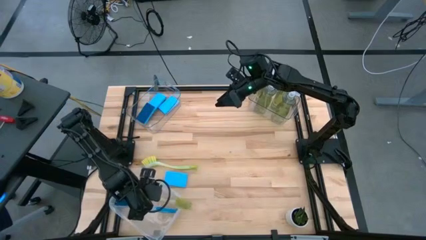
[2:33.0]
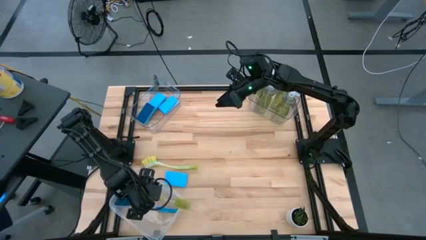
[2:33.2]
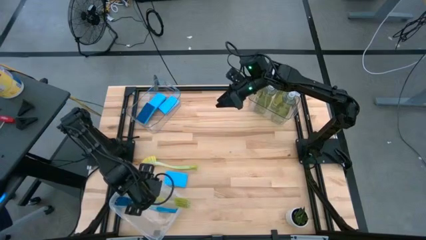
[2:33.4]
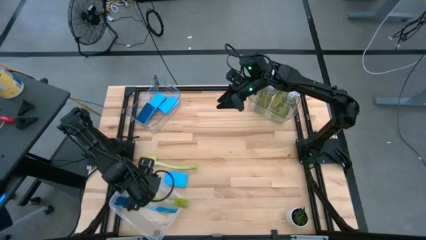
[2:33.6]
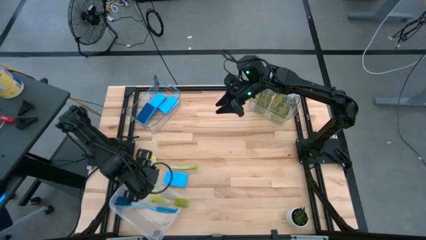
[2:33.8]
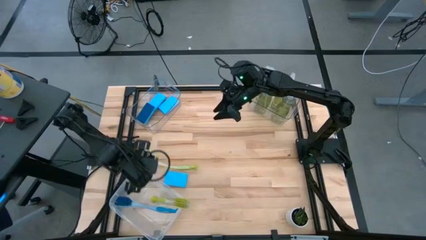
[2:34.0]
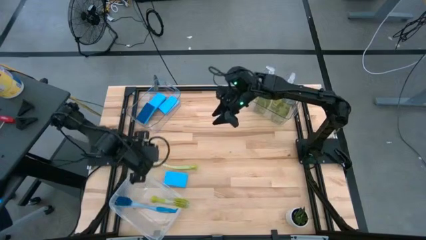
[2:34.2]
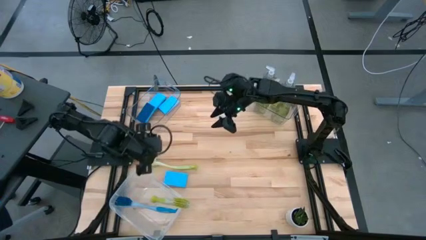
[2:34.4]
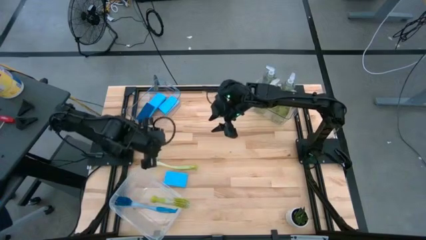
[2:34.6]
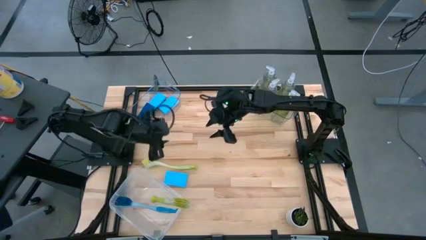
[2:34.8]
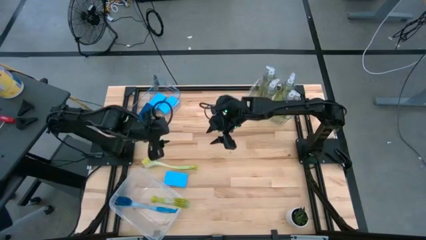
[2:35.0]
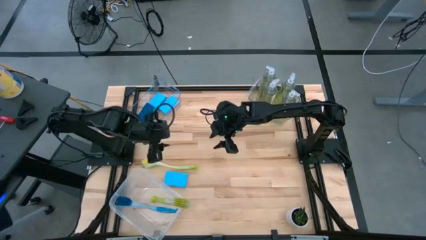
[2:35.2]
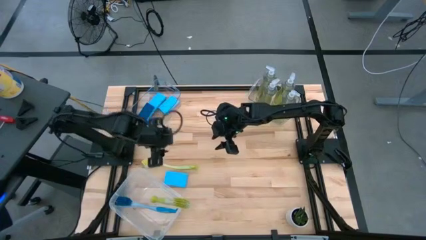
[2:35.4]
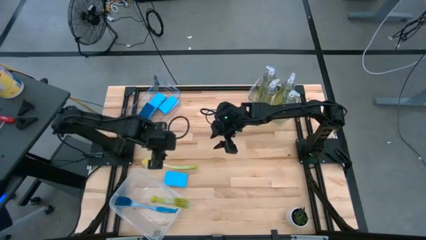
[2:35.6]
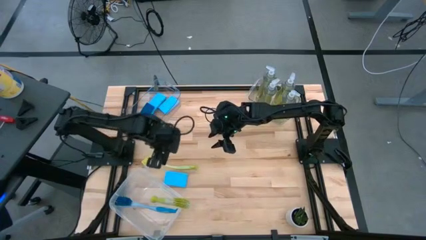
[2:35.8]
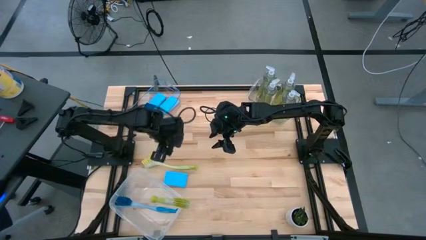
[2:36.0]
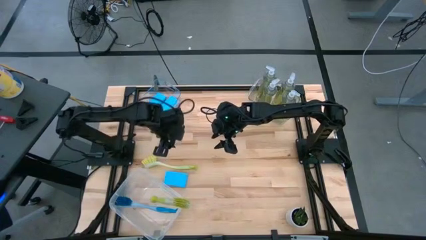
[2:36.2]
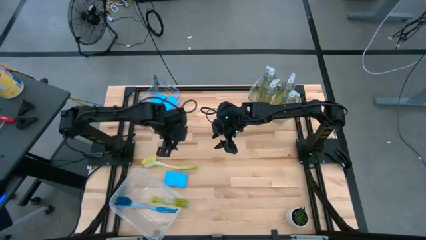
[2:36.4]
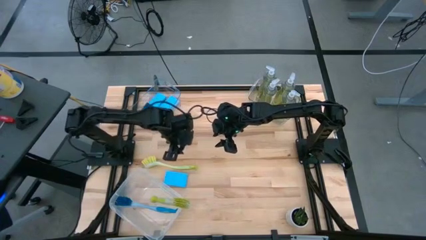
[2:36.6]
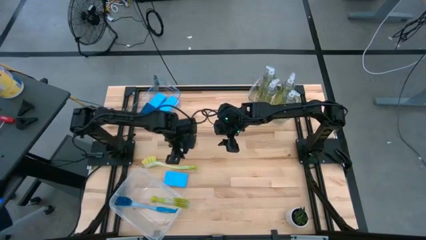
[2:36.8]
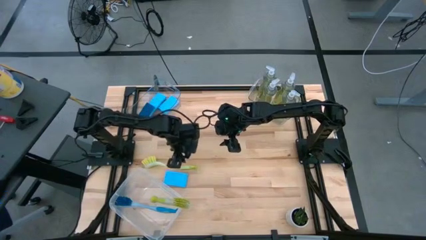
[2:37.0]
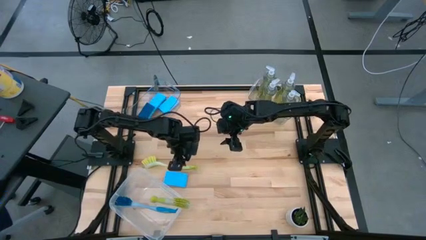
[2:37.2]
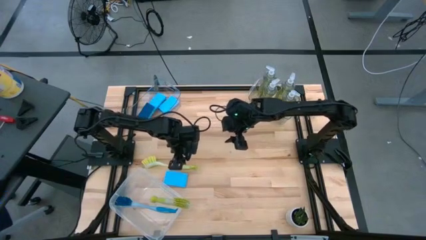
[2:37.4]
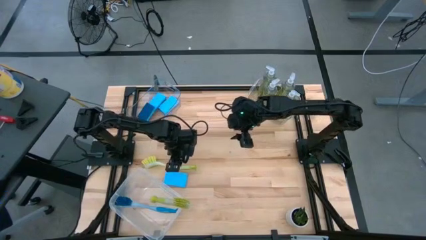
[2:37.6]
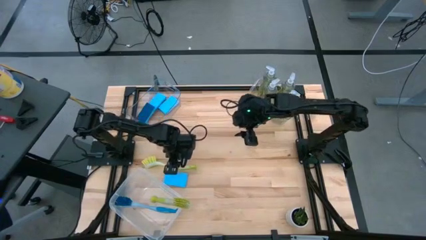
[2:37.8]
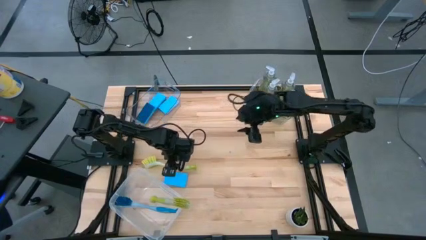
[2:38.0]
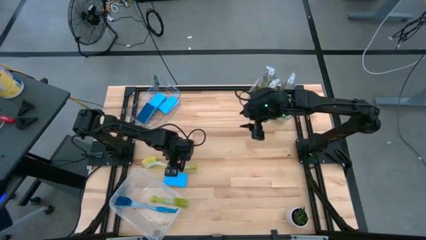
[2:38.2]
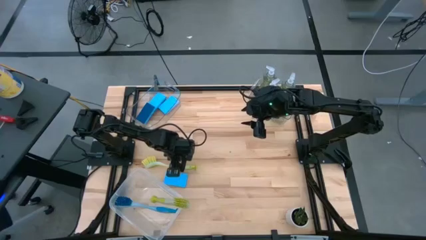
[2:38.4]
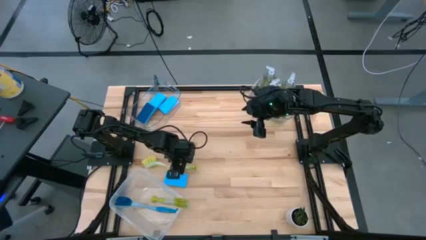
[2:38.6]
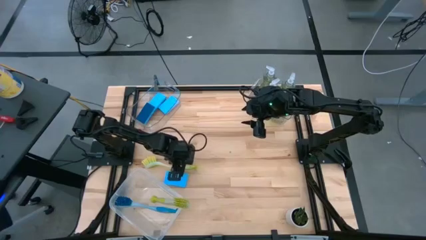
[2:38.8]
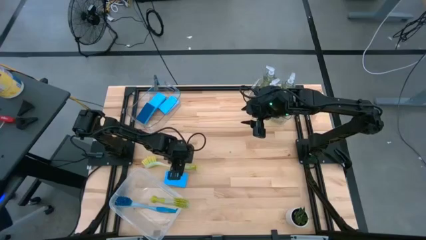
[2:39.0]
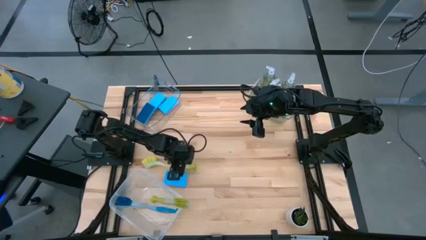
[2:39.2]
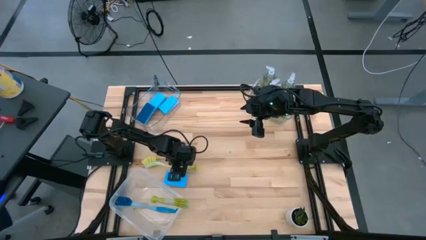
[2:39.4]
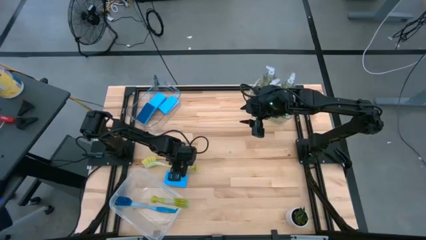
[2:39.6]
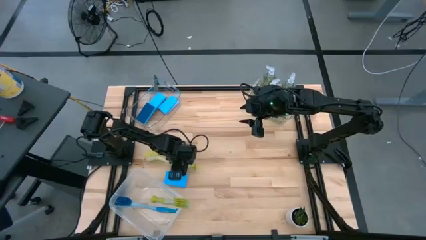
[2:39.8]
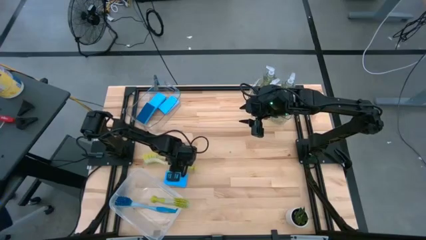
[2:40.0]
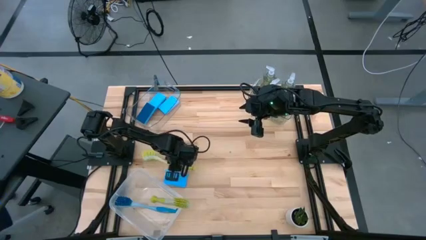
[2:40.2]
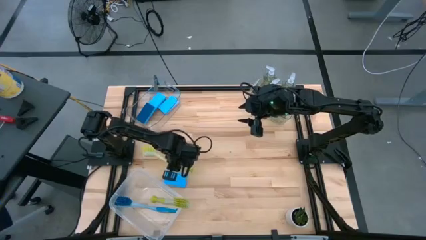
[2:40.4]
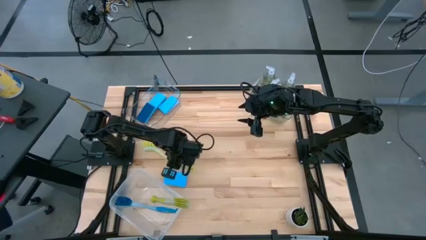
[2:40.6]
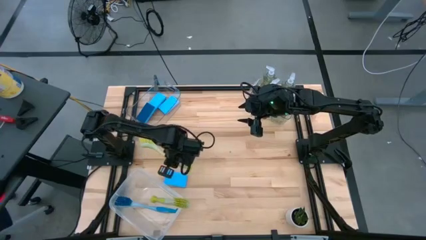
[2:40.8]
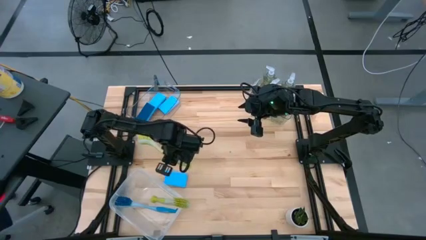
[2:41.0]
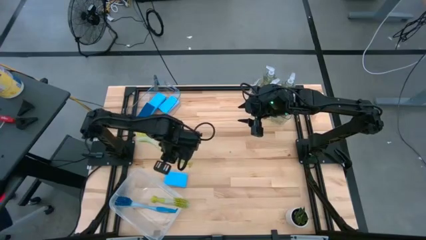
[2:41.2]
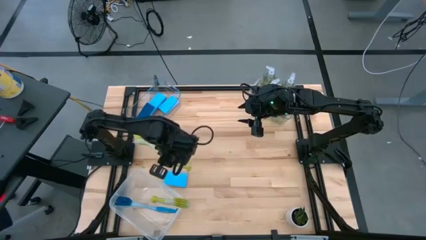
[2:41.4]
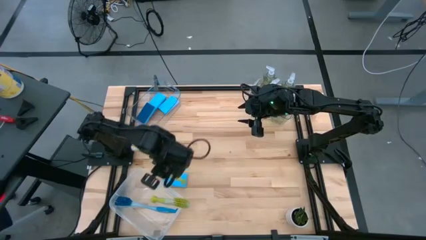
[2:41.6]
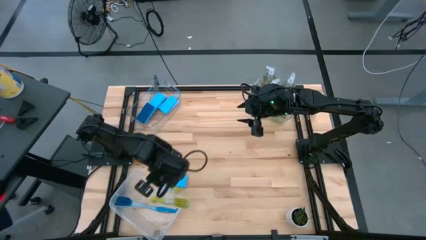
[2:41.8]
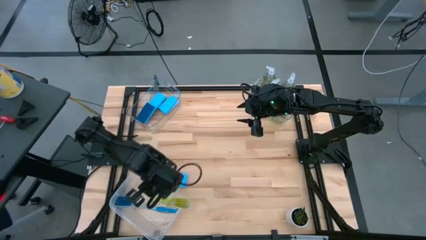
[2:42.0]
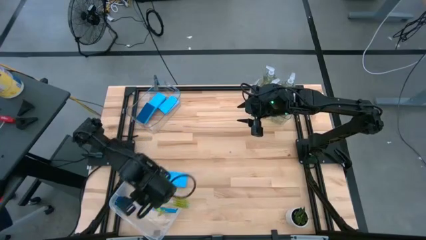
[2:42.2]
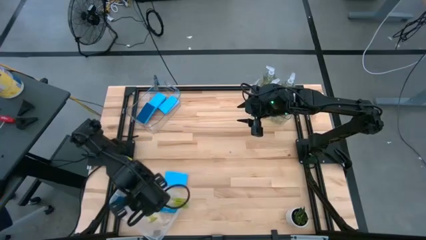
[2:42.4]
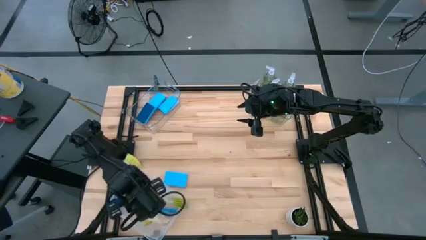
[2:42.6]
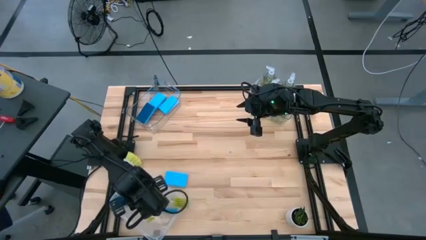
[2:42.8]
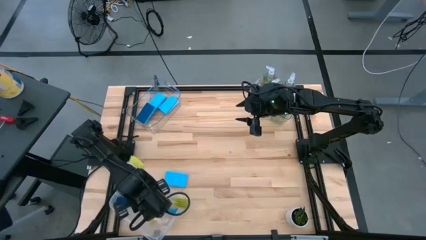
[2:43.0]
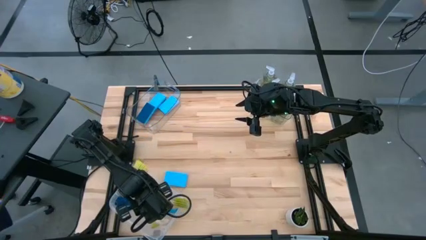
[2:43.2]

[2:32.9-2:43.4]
Task: Pick & Place Kitchen Sink Supplies
Put the yellow dish brush into the white bin

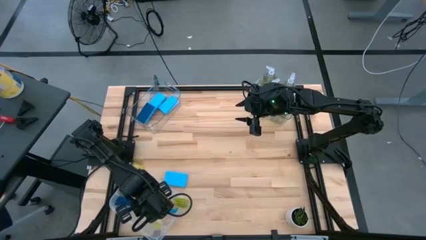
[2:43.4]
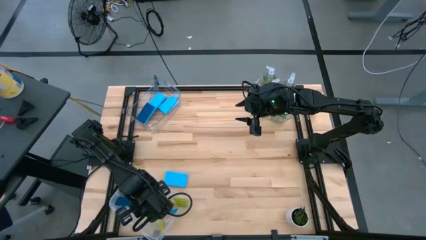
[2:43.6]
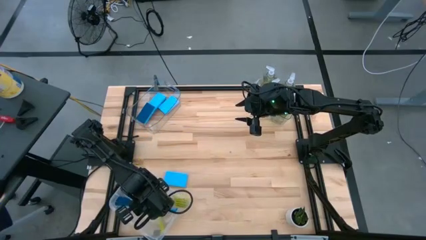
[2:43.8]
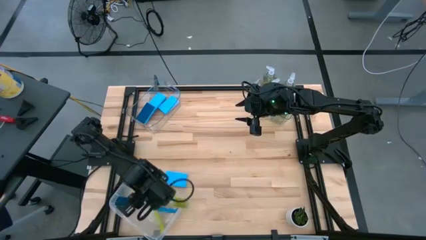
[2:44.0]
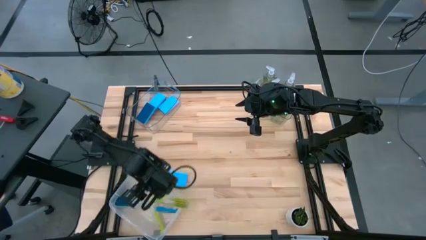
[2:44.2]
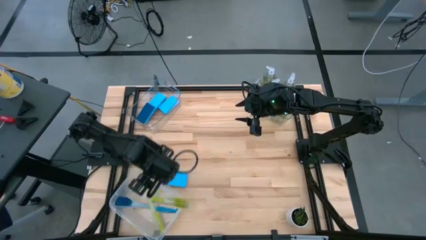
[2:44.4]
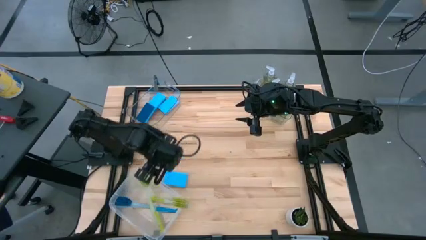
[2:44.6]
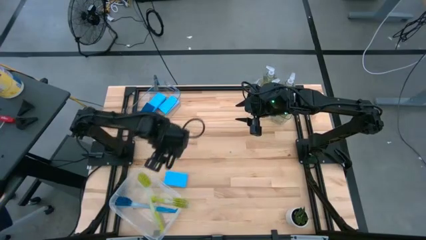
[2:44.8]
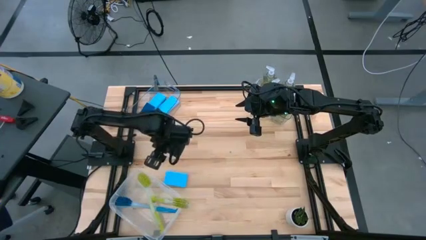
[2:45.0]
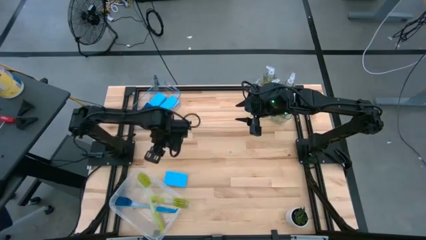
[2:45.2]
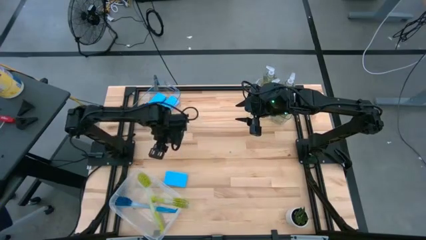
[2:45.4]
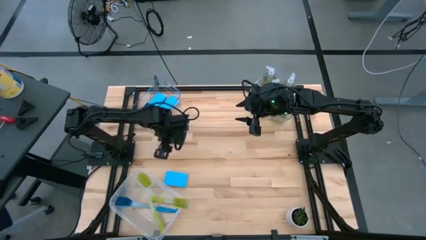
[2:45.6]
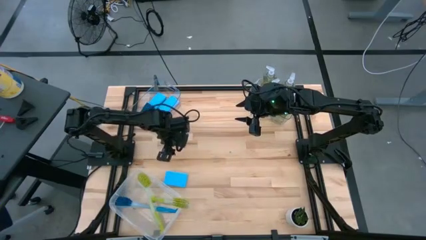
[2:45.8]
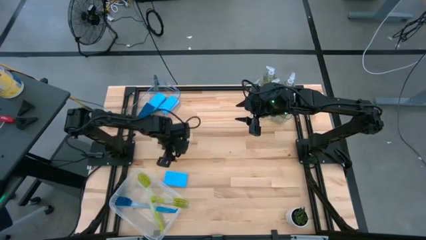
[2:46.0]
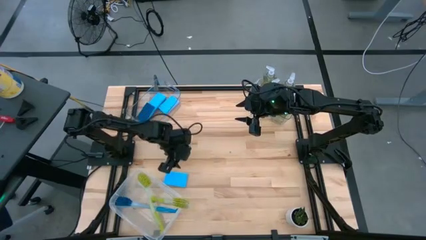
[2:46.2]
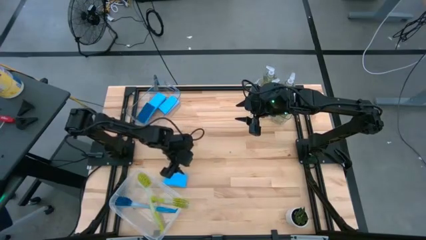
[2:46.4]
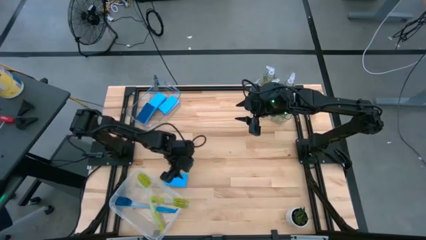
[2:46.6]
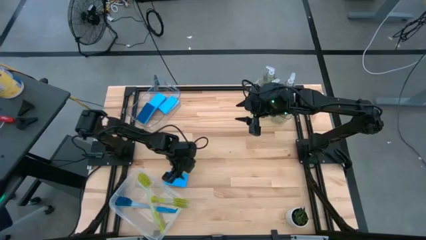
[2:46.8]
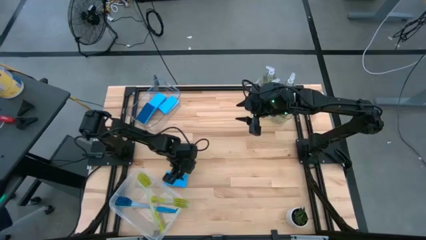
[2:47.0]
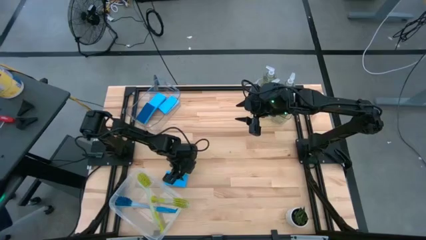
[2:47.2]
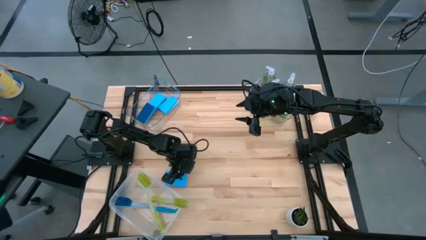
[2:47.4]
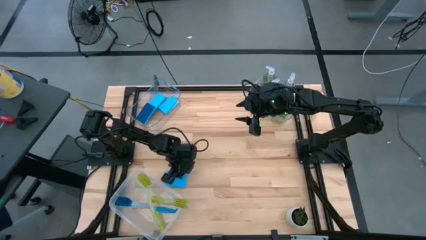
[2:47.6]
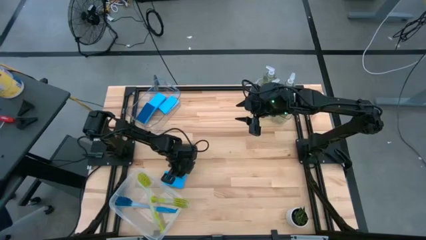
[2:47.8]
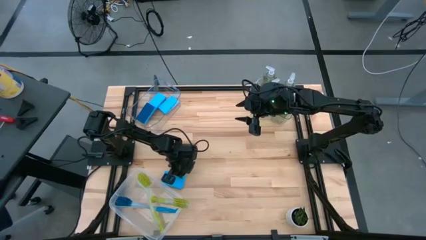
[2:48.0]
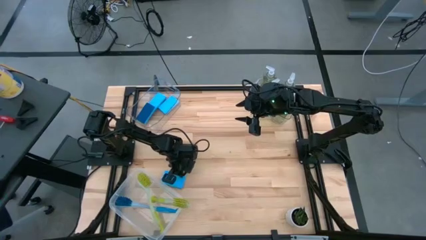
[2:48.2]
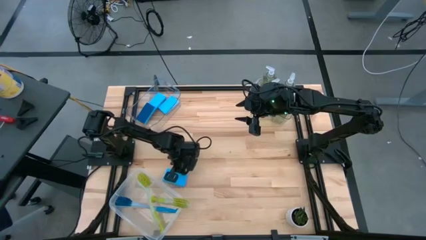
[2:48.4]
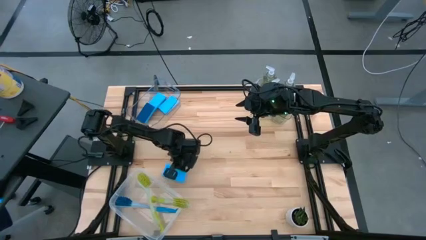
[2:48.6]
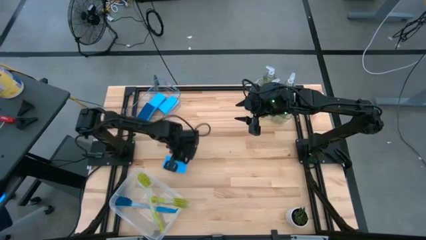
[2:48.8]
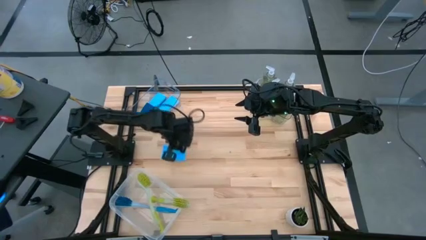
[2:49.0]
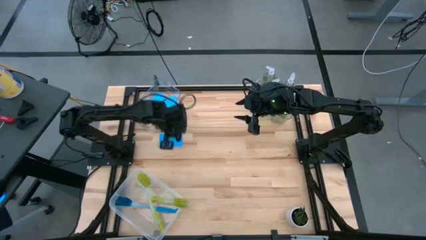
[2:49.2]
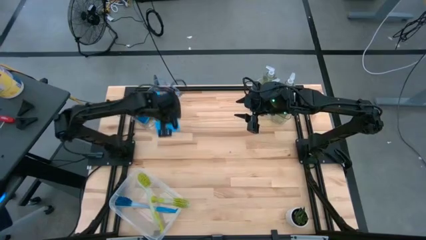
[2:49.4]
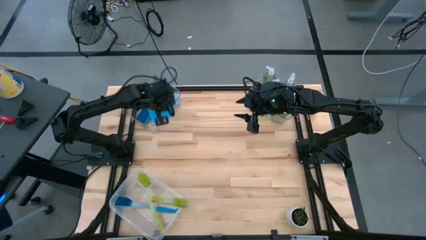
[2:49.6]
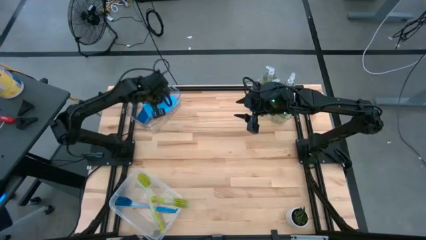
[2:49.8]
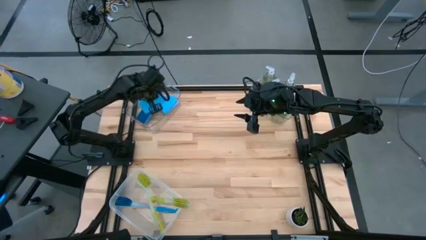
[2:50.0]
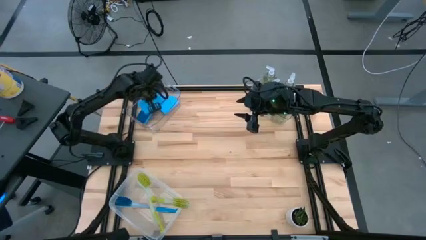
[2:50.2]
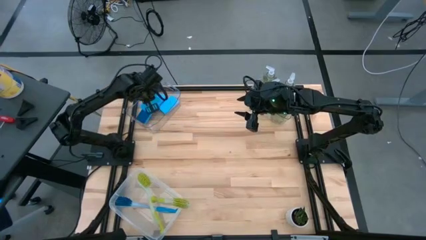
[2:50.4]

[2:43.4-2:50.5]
Put the blue sponge into the left transparent bin
